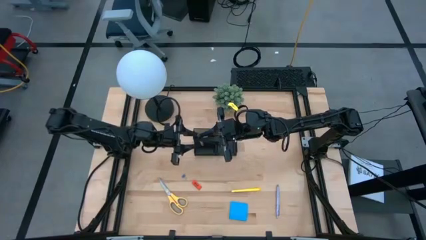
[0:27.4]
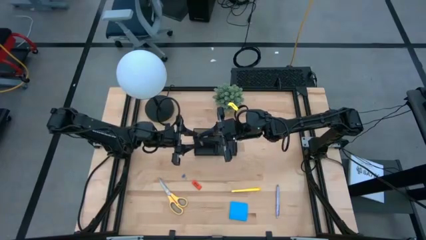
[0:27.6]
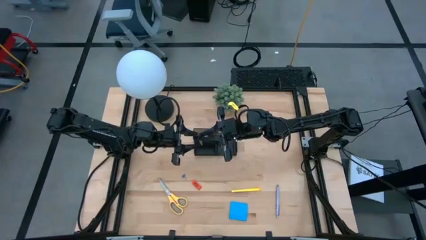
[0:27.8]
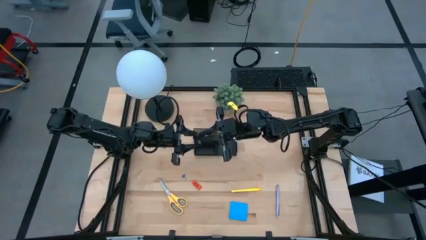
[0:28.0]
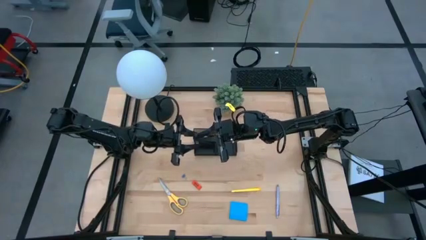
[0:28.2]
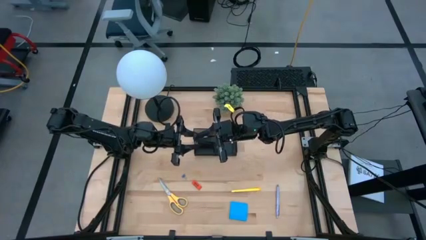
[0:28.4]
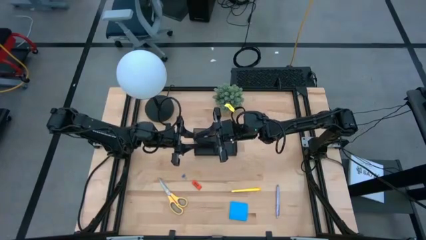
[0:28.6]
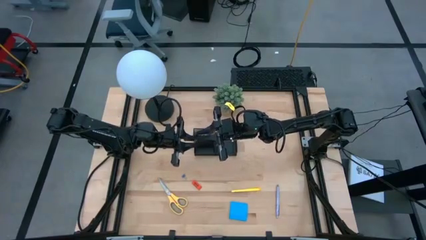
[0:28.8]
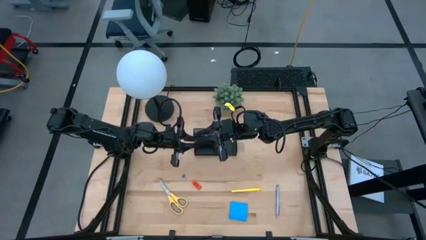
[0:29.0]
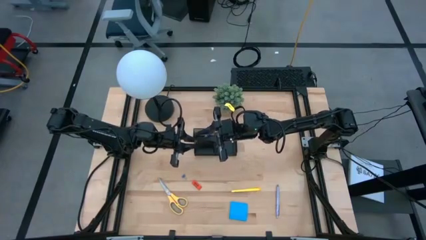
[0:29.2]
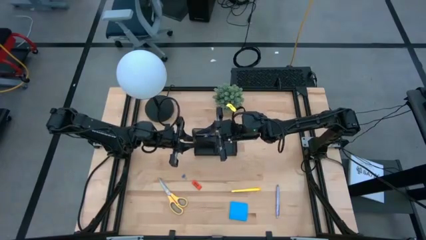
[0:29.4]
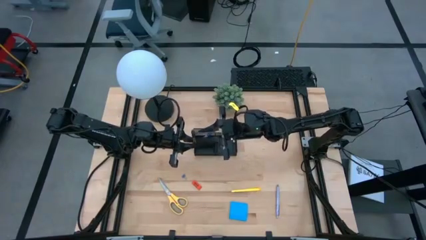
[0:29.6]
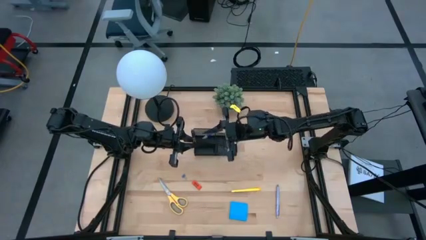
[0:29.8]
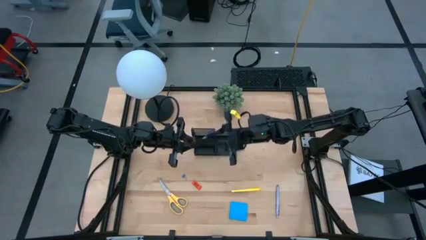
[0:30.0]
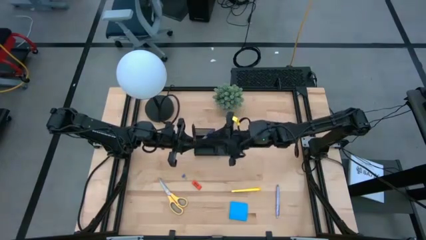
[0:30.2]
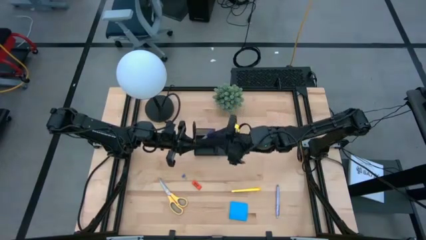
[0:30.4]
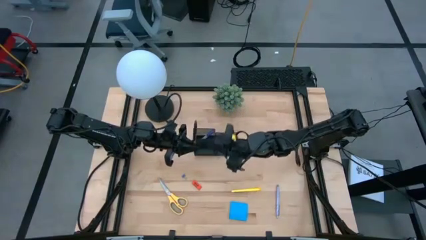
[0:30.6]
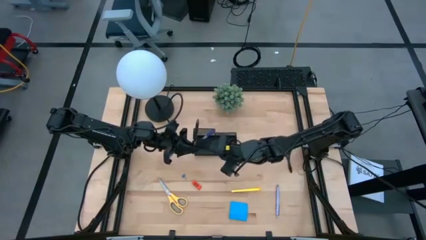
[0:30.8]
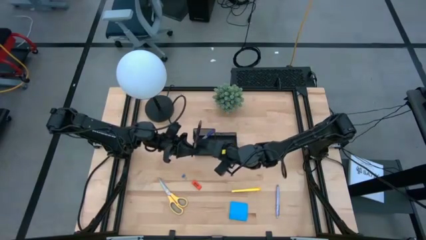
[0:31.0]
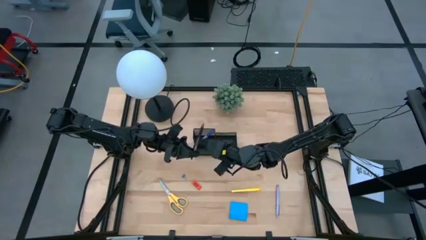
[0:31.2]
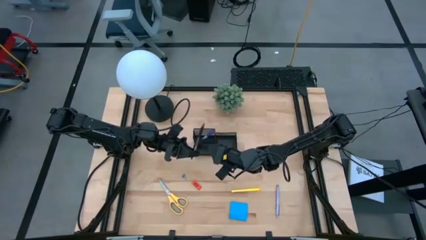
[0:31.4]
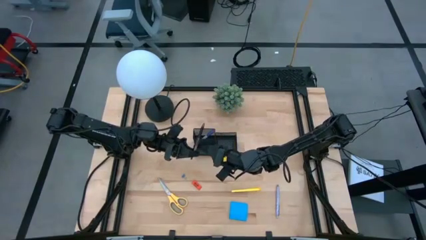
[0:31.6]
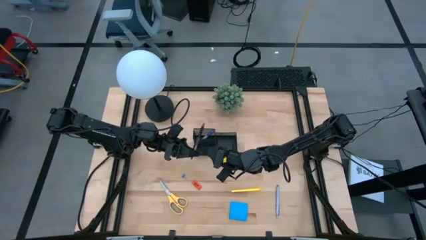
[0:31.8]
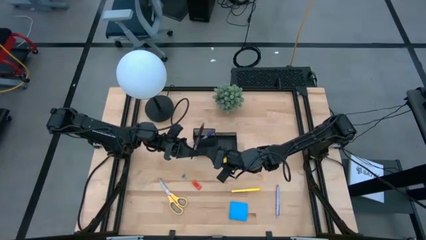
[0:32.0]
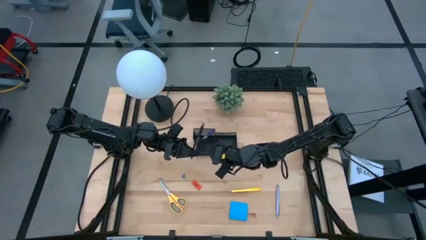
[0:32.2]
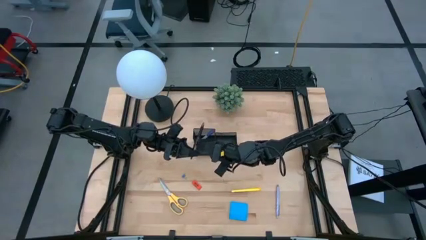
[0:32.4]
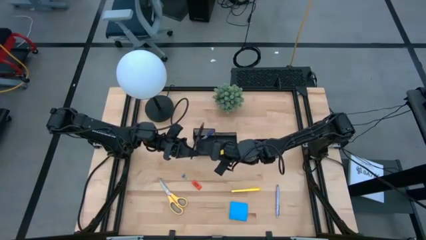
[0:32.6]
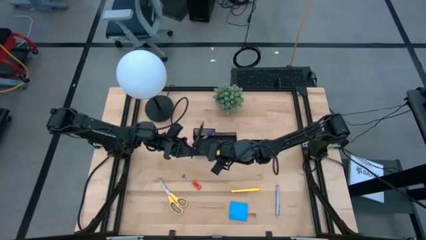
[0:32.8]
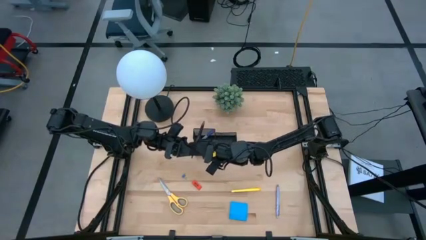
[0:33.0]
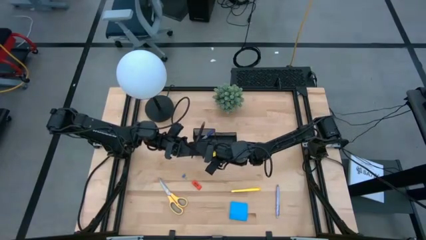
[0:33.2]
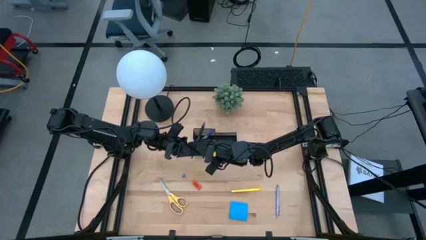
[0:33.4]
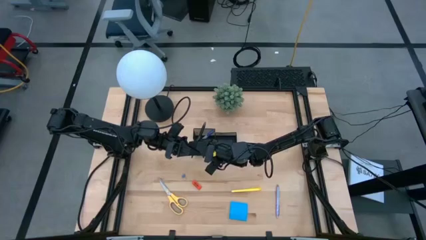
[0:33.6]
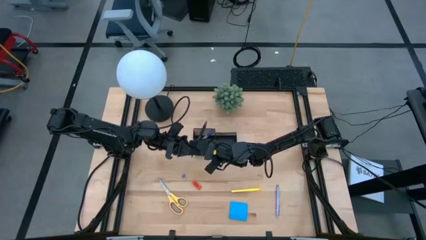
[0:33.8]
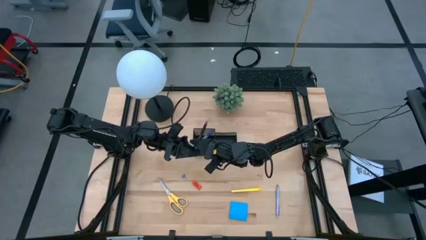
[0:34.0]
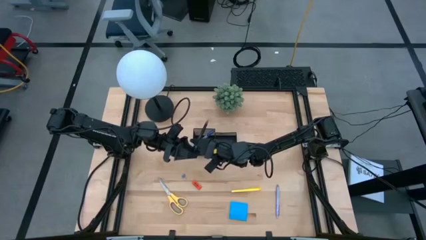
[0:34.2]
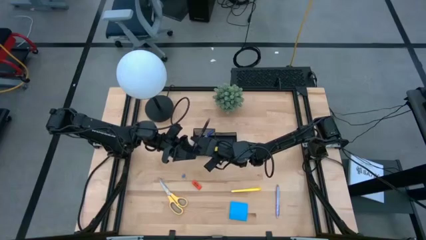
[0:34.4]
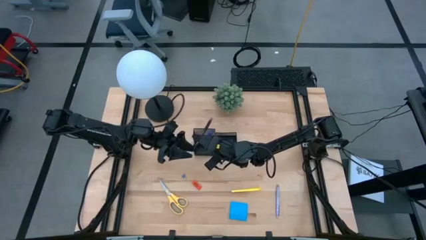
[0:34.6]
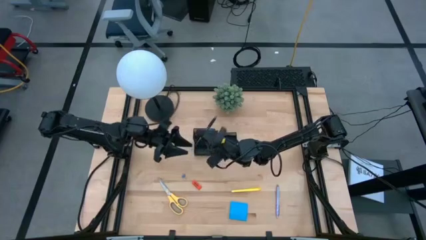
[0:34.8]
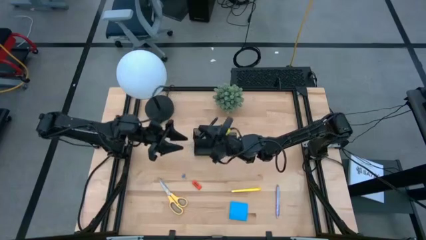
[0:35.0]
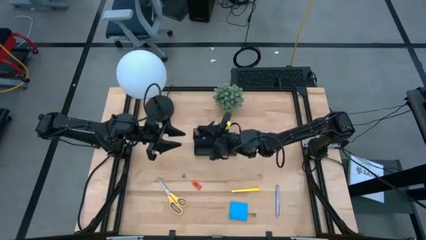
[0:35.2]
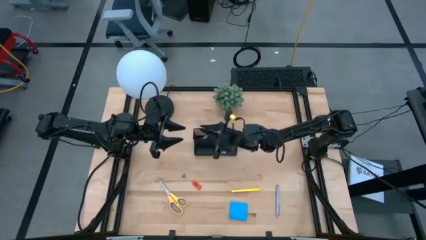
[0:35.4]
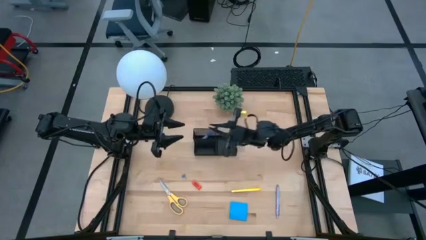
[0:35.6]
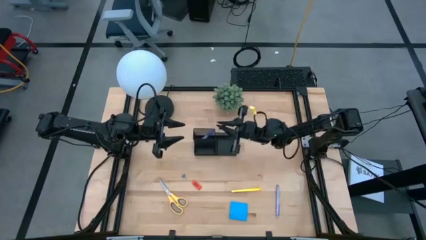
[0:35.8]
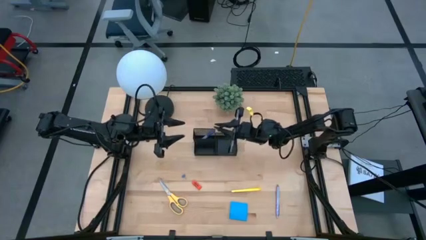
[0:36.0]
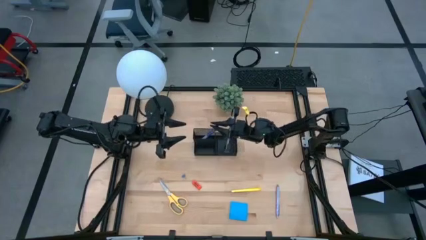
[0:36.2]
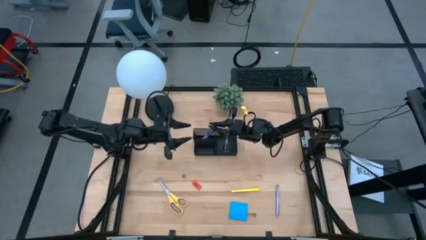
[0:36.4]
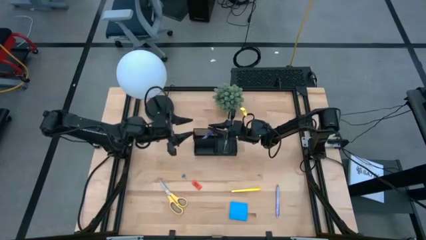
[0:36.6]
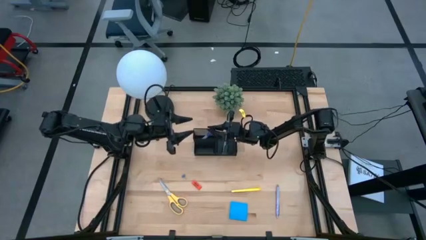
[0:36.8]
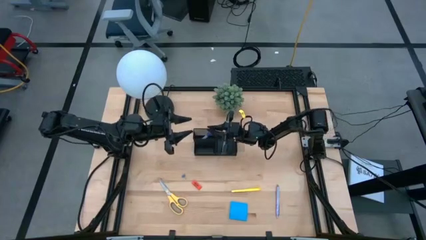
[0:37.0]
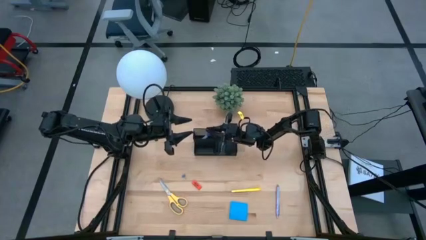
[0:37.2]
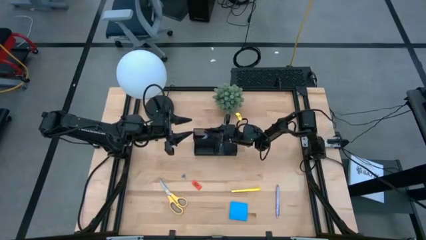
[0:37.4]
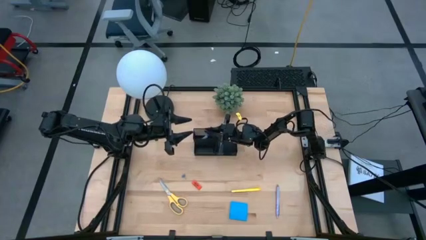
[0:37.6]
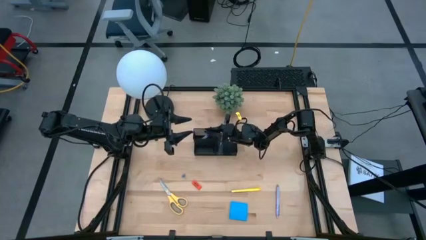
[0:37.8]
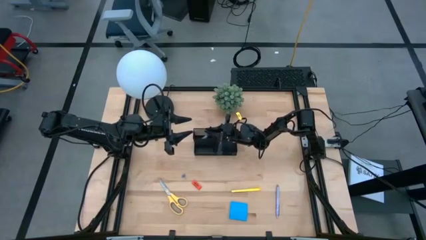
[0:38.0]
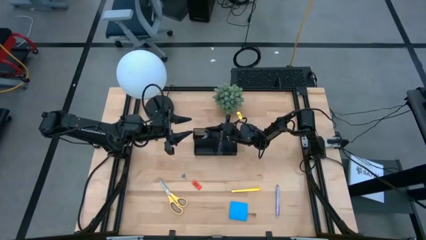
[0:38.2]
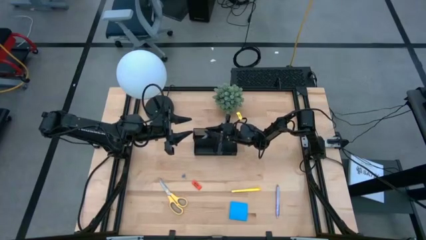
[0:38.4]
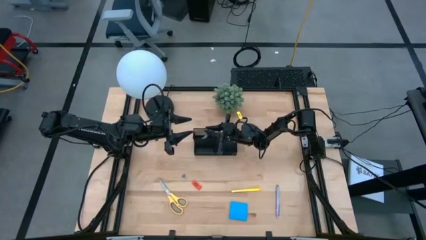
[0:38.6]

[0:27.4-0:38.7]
Task: Pick and place office supplies into organizer
Put the black pen into the desk organizer
